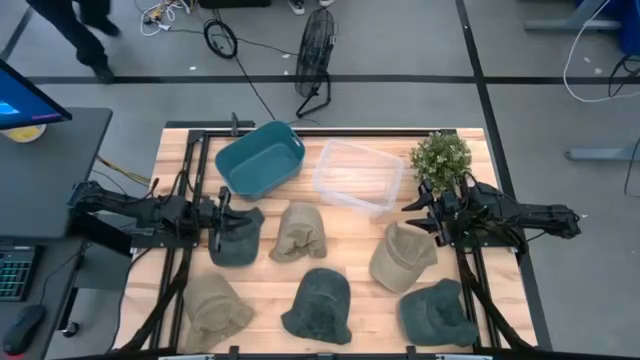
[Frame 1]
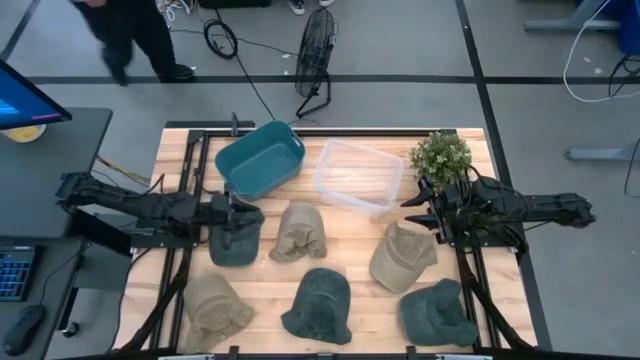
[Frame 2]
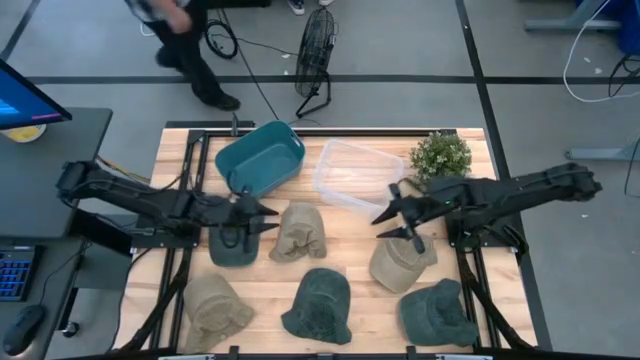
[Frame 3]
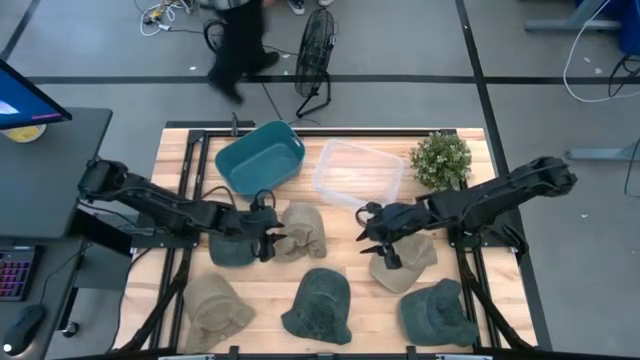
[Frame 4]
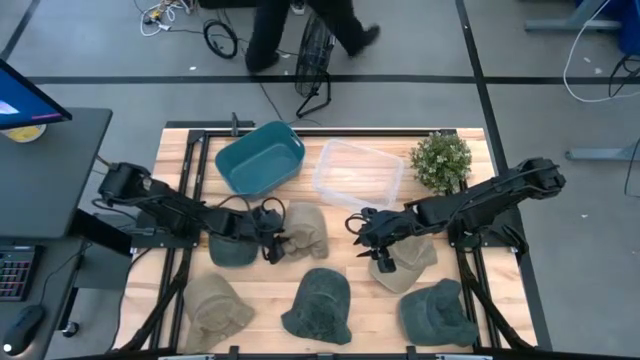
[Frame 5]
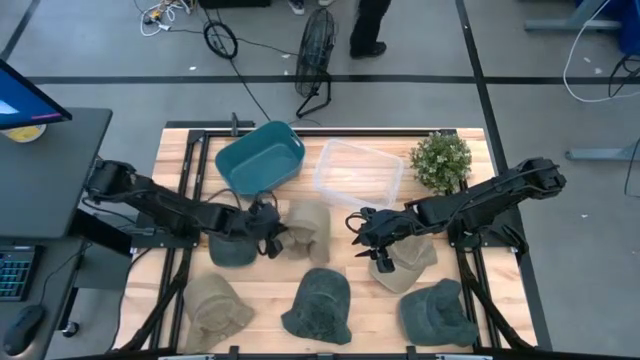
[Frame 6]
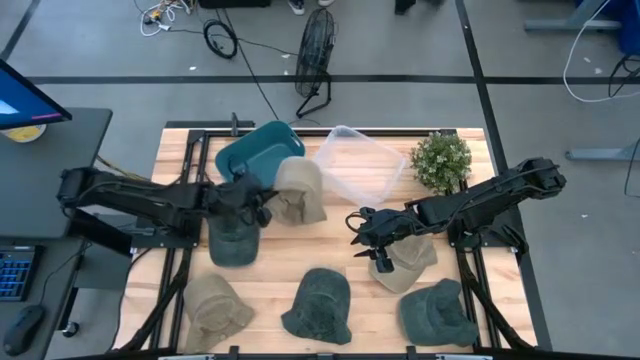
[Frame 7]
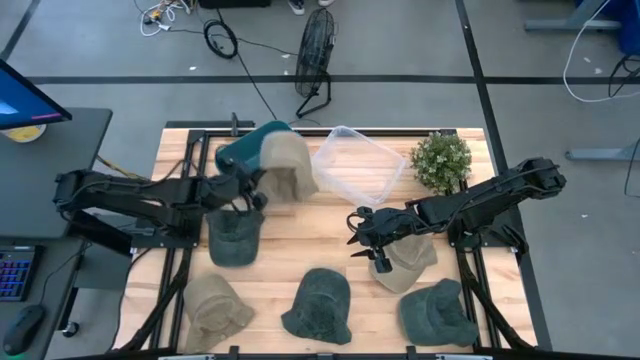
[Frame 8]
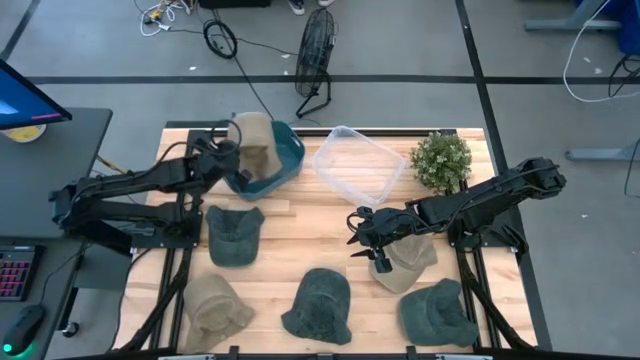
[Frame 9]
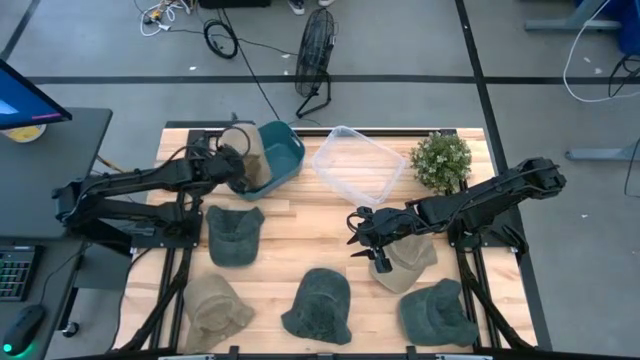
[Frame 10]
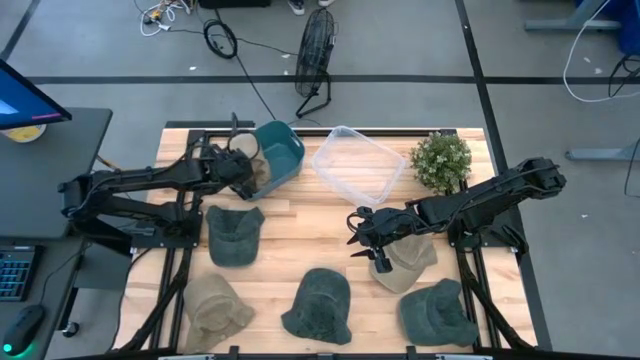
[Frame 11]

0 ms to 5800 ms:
Task: Pick & Place hat
Put the middle brown cap into the blue bin

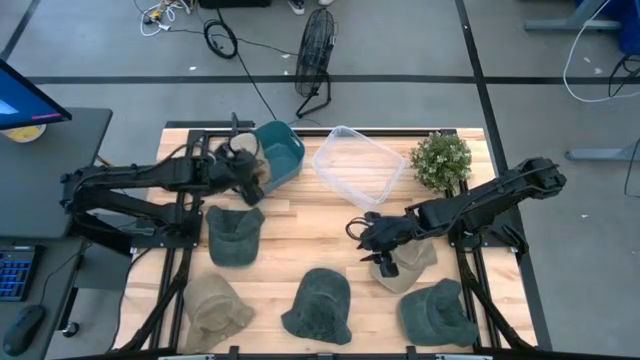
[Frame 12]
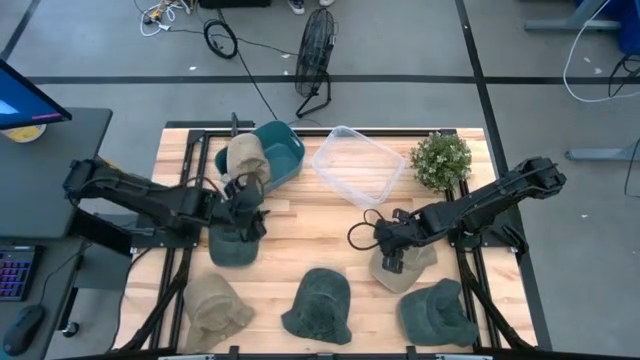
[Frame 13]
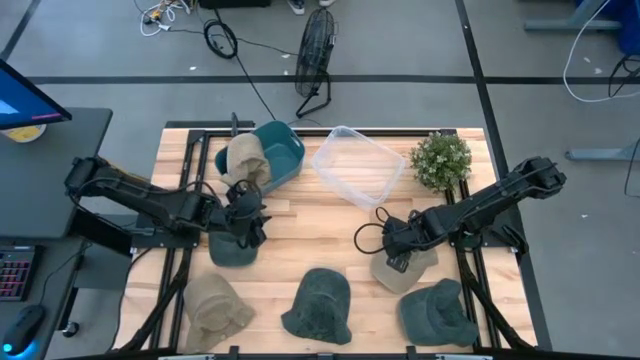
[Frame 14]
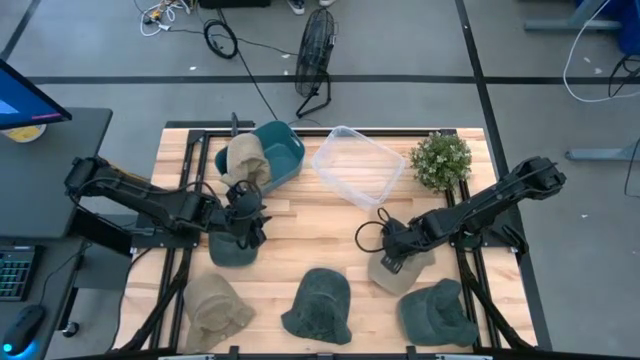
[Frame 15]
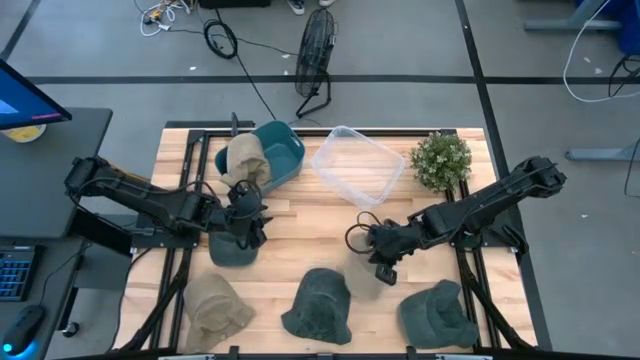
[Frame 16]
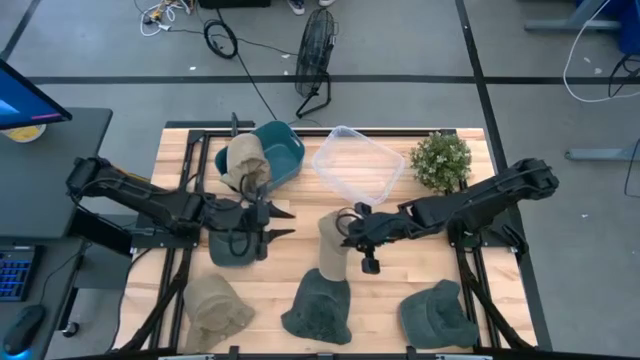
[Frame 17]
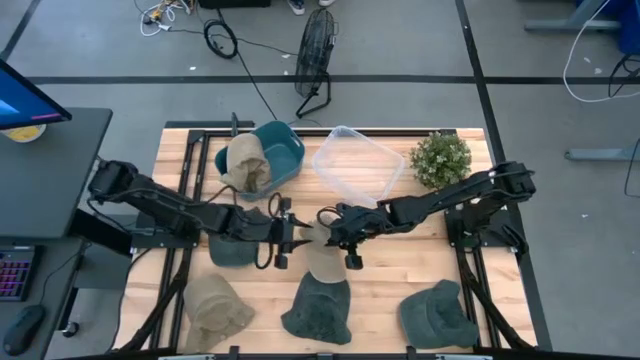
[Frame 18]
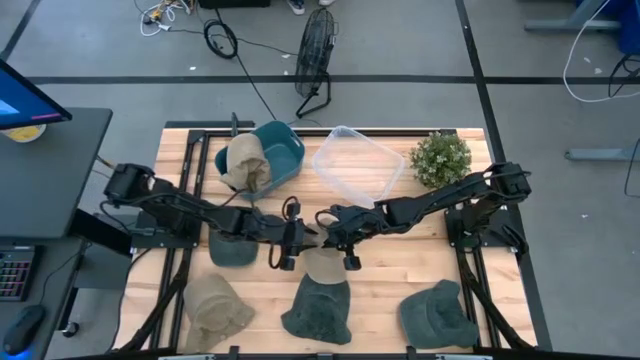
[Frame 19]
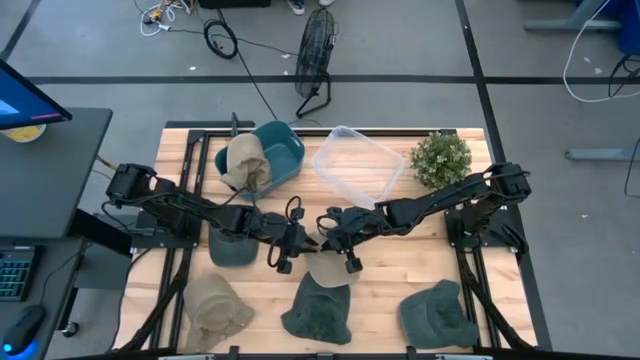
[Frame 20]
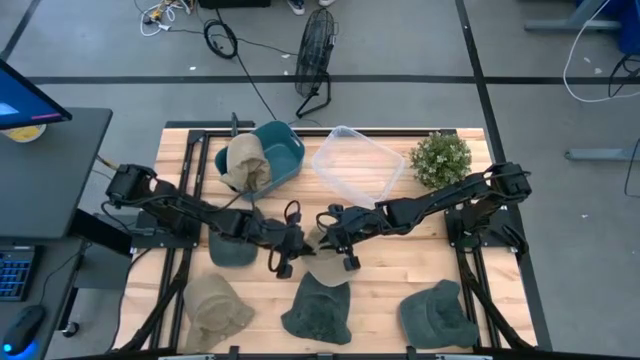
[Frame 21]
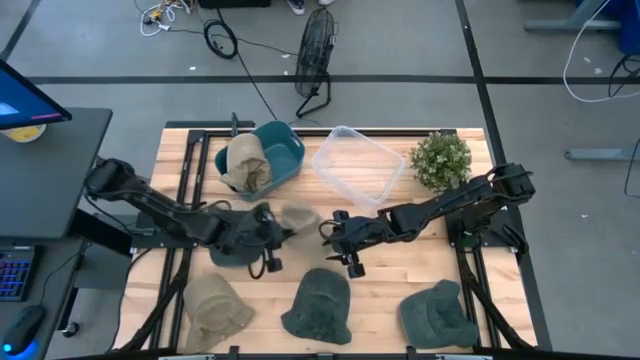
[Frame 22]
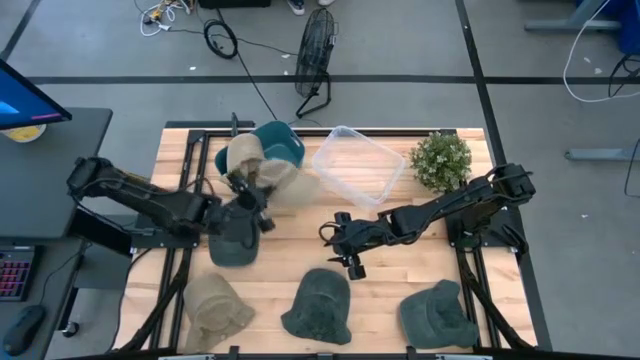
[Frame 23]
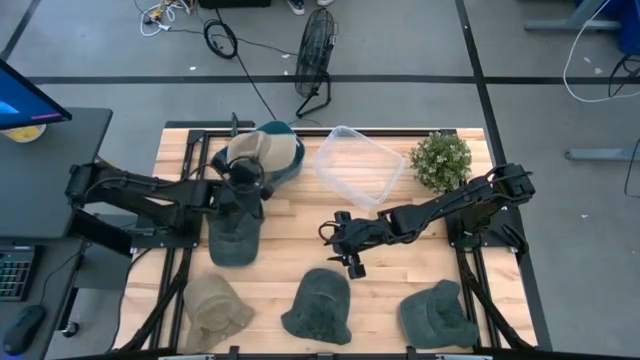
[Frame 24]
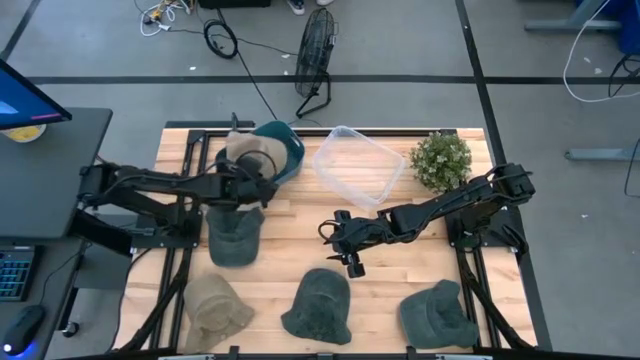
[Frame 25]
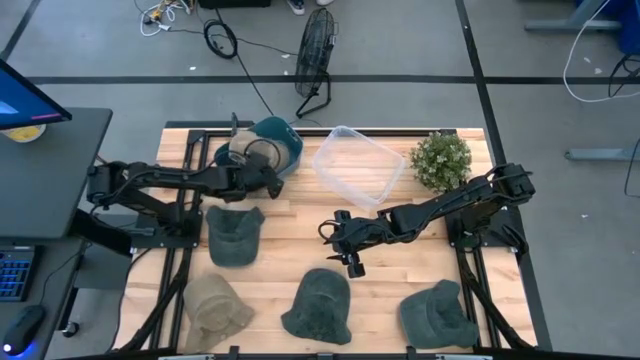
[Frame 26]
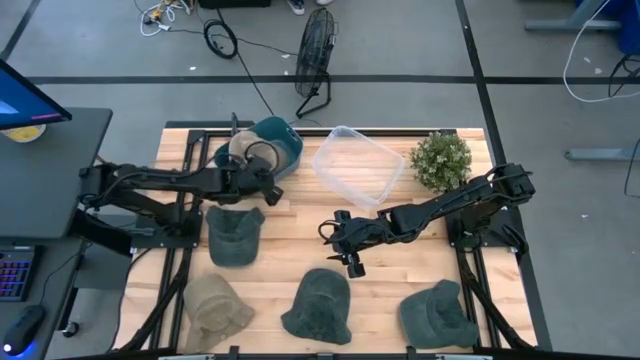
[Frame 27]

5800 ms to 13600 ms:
Put the right brown cap into the blue bin

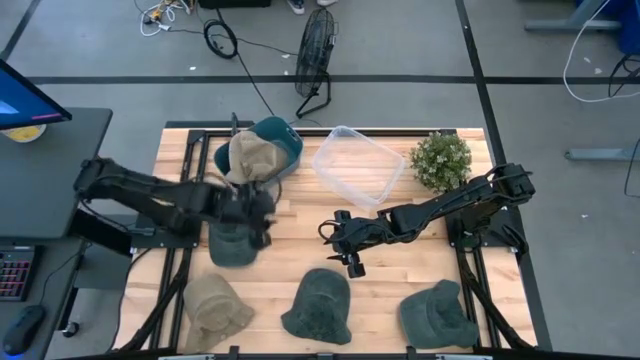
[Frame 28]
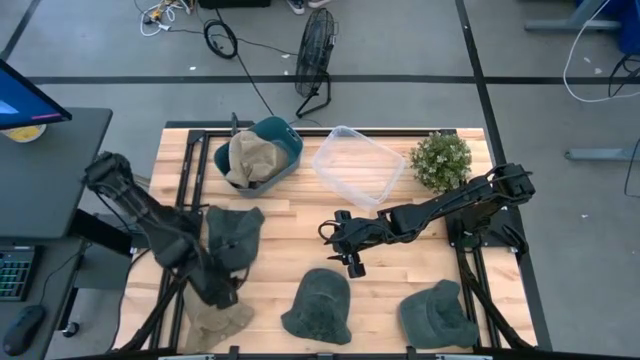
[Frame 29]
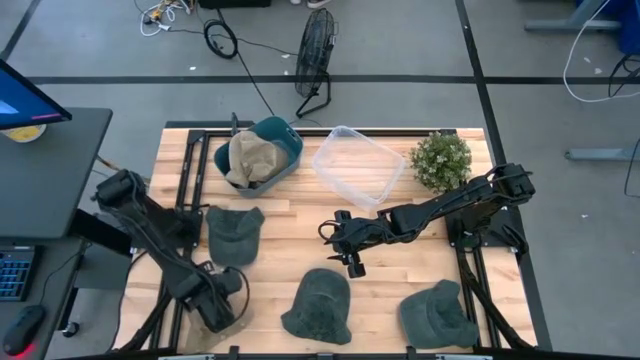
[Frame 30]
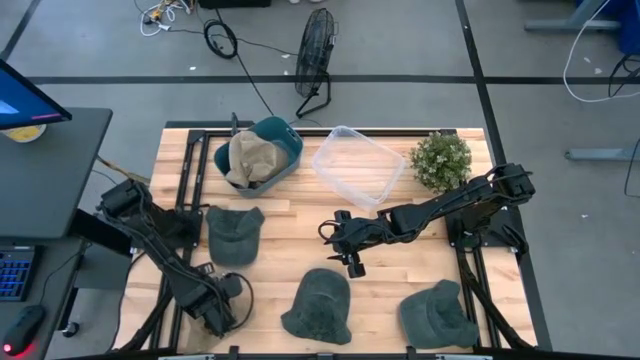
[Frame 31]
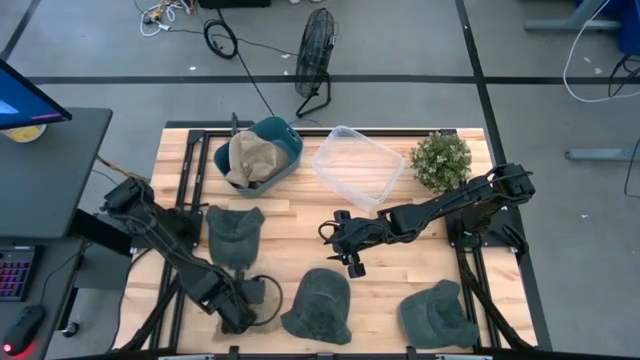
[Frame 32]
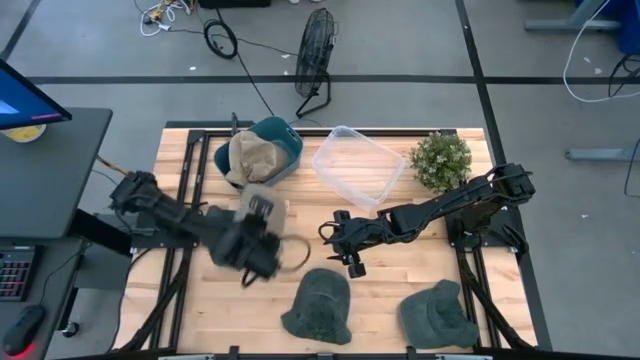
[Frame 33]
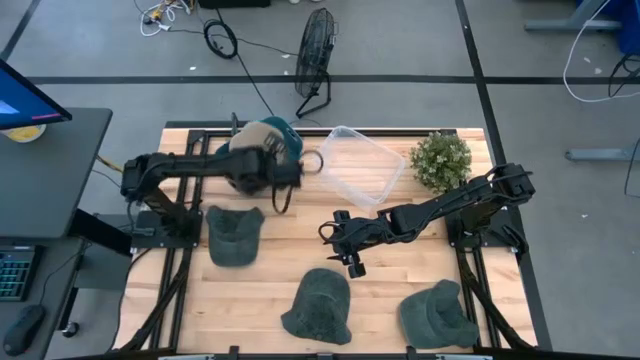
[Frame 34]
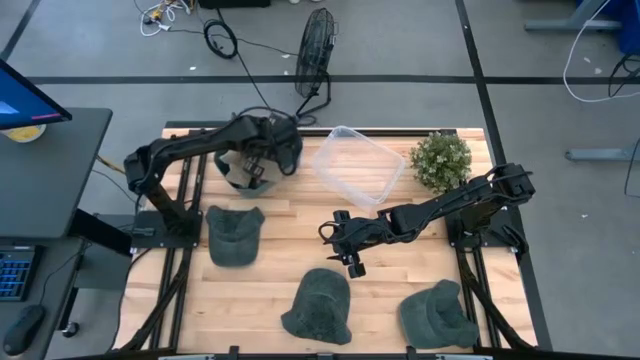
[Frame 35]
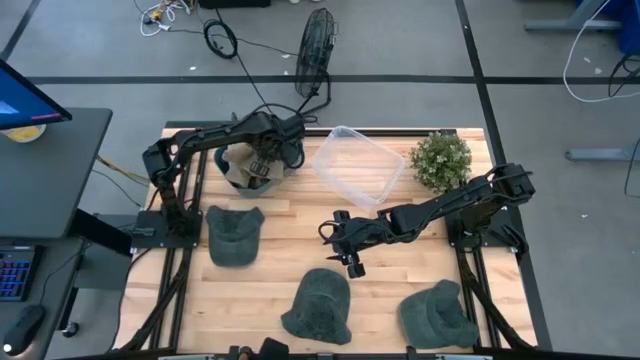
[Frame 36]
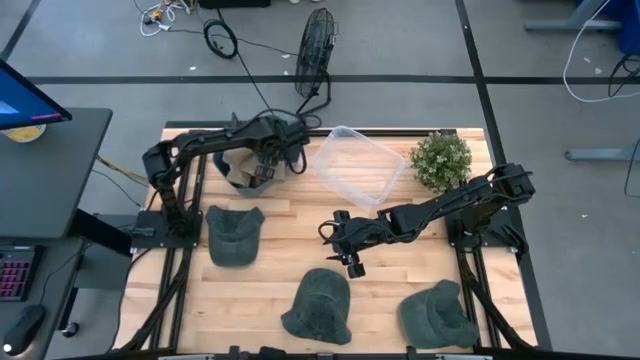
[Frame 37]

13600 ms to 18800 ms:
Put the brown cap into the blue bin

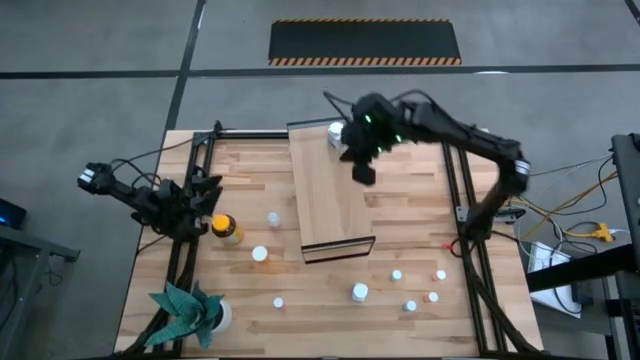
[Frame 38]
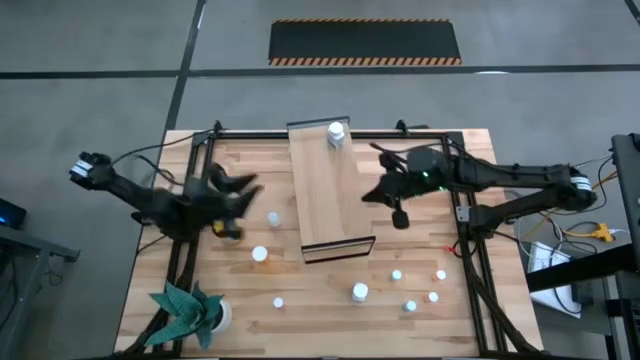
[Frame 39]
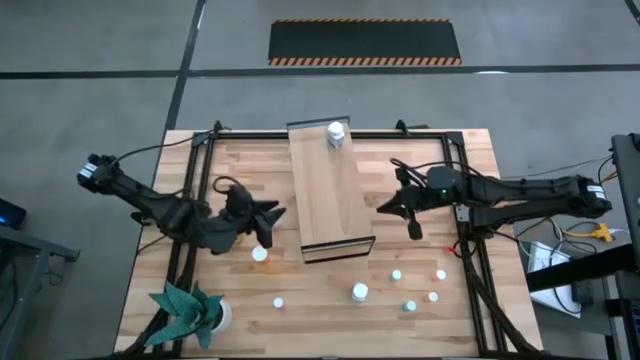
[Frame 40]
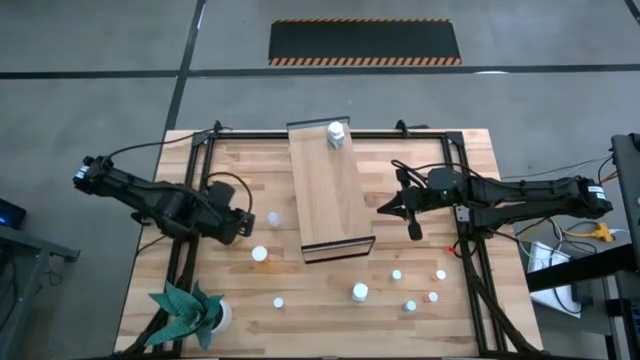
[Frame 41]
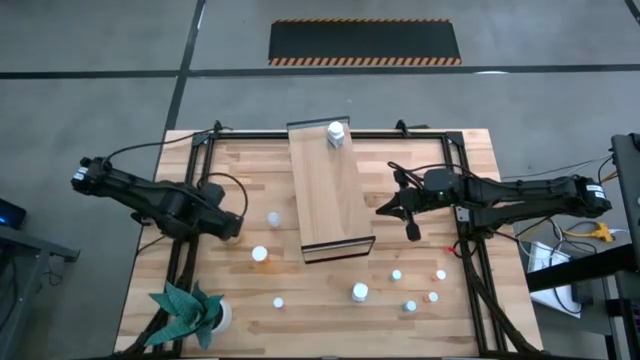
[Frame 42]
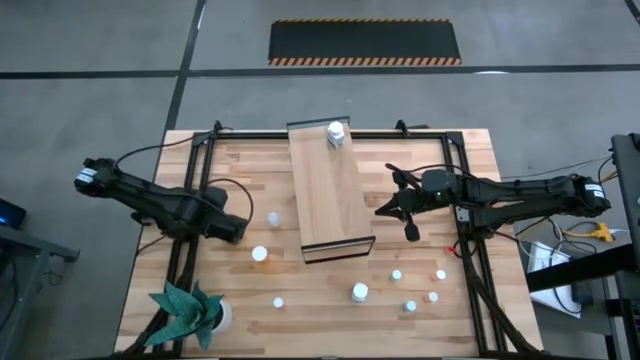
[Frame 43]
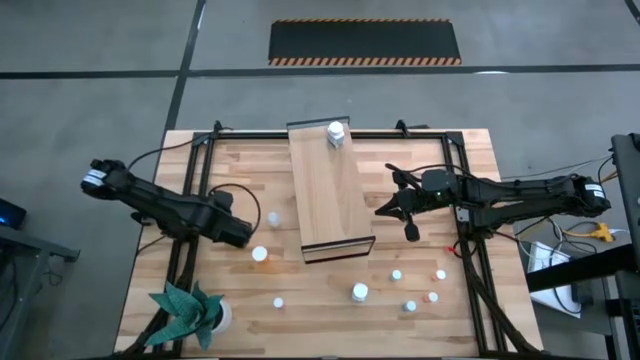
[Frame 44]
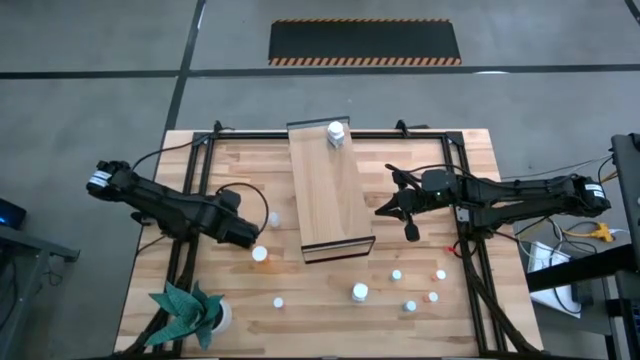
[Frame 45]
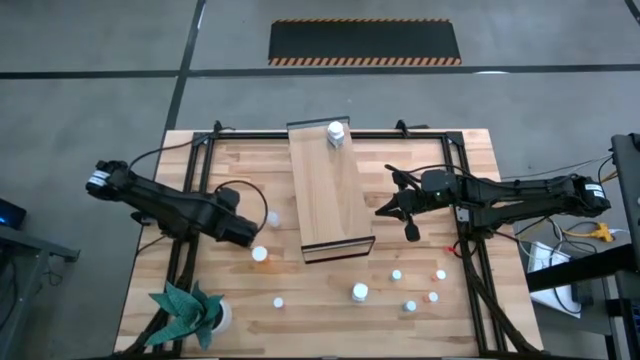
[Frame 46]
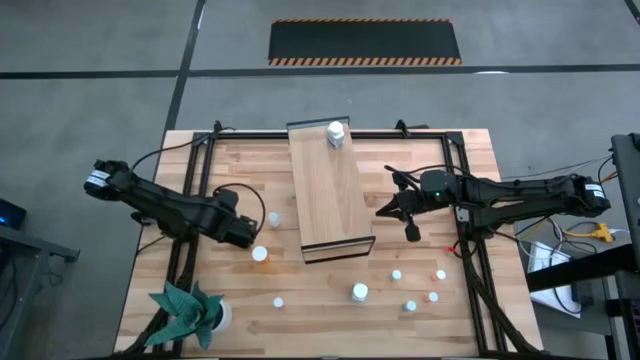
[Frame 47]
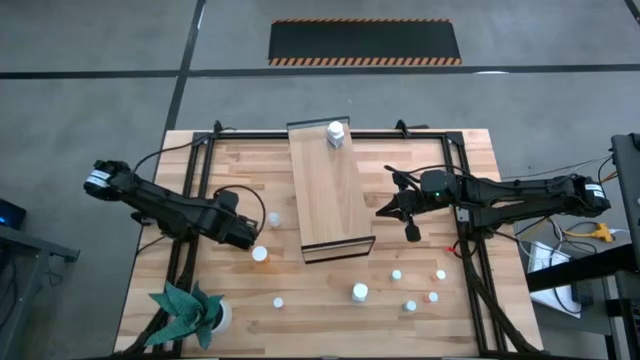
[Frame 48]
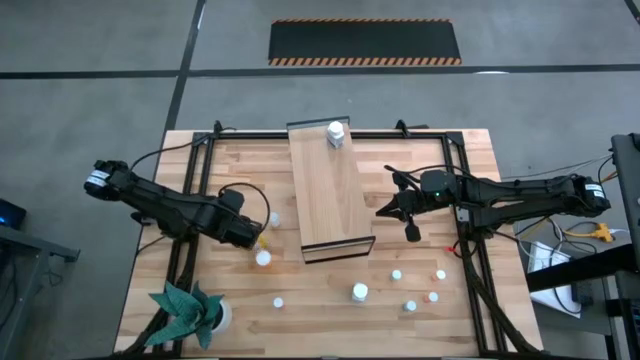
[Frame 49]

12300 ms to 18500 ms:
Task: Pick and place medicine bottles onto shelf by color
Put the yellow pill bottle on the shelf
